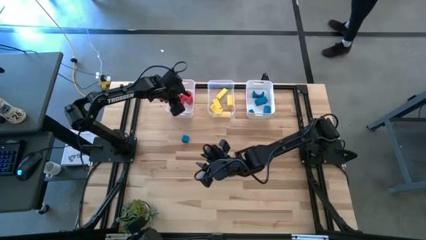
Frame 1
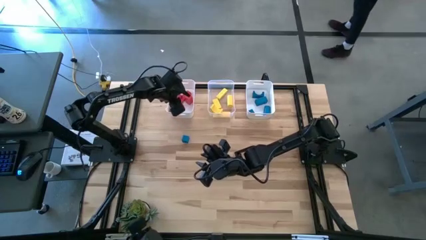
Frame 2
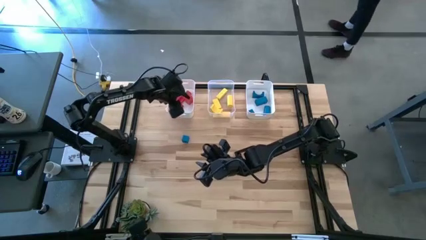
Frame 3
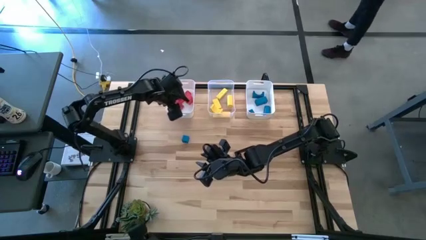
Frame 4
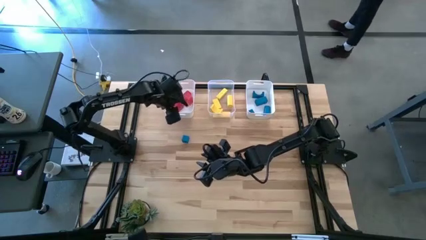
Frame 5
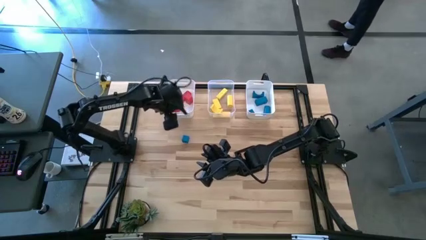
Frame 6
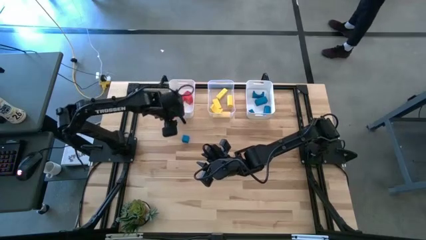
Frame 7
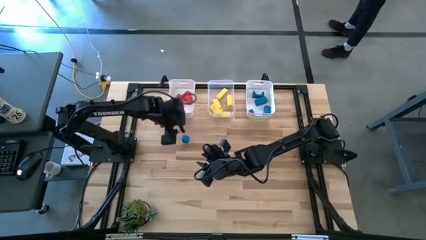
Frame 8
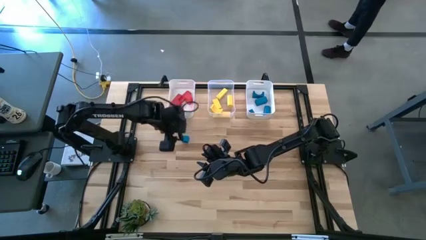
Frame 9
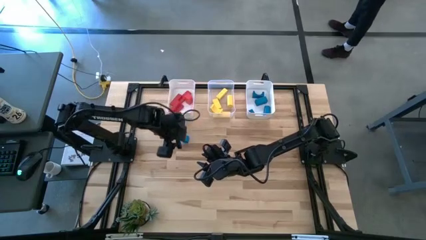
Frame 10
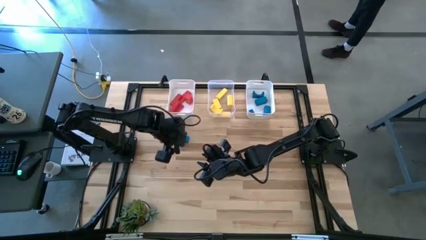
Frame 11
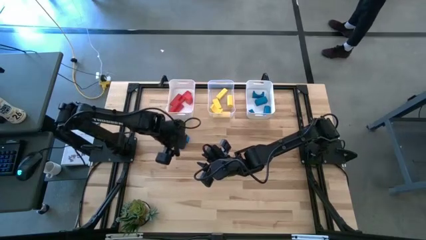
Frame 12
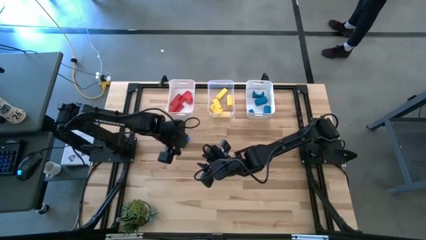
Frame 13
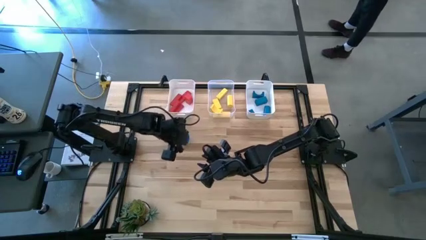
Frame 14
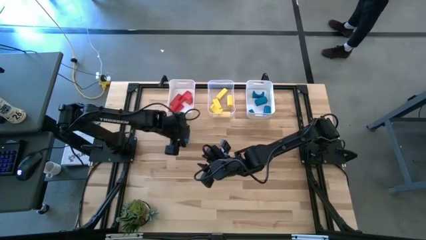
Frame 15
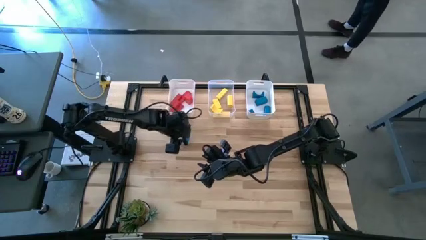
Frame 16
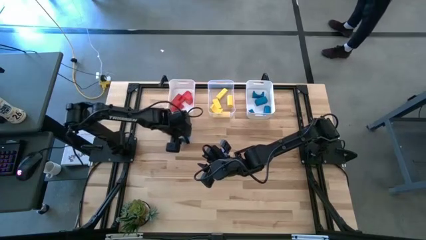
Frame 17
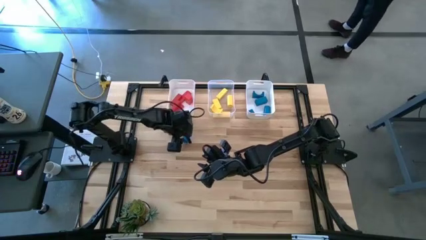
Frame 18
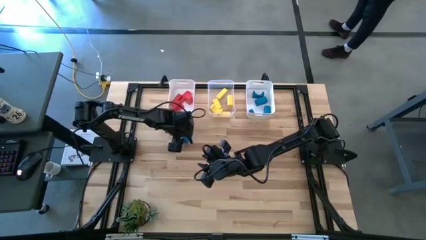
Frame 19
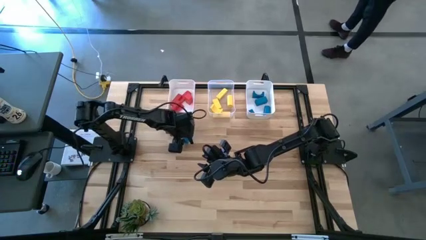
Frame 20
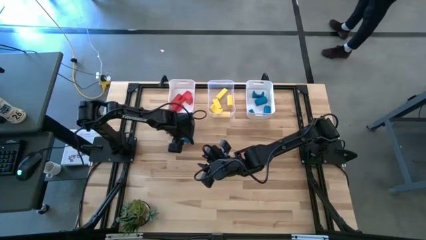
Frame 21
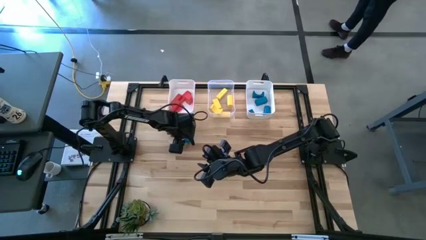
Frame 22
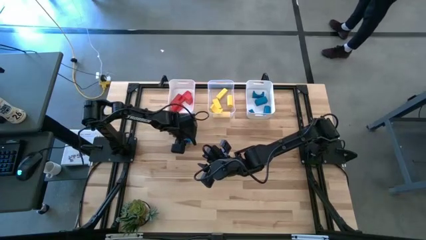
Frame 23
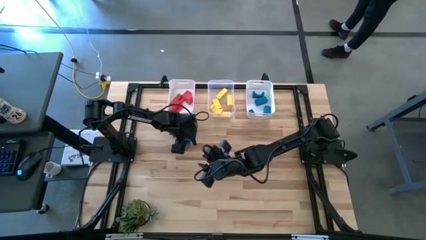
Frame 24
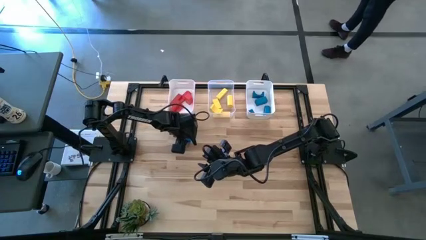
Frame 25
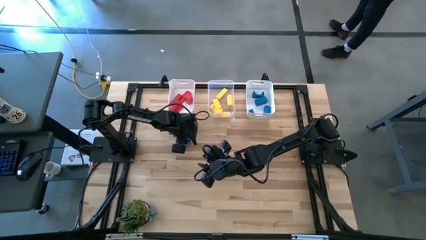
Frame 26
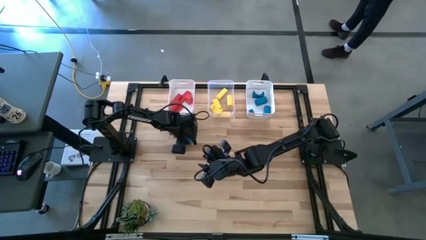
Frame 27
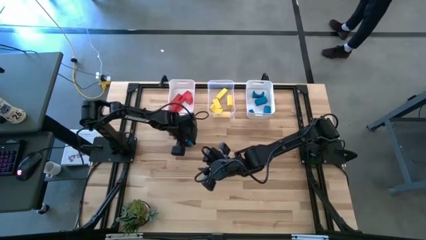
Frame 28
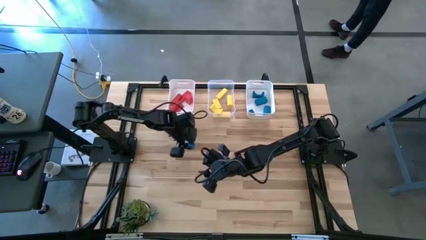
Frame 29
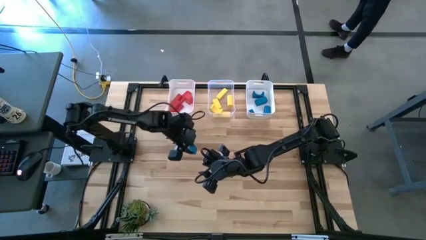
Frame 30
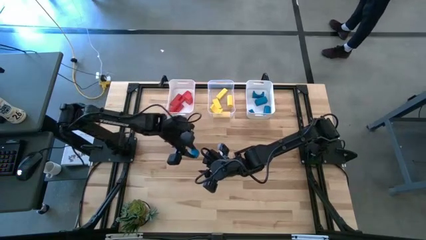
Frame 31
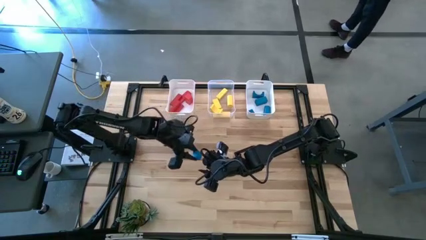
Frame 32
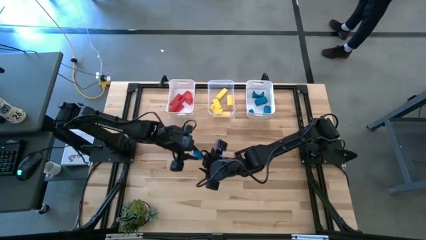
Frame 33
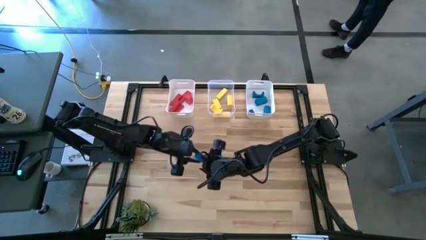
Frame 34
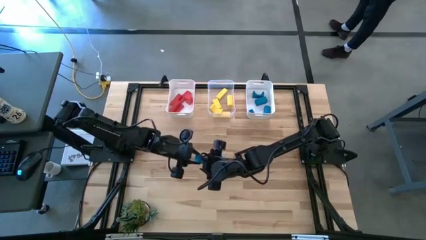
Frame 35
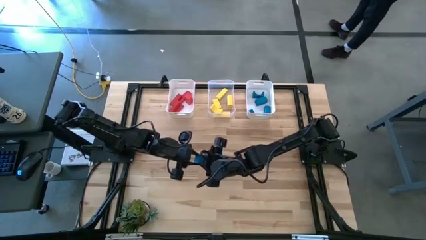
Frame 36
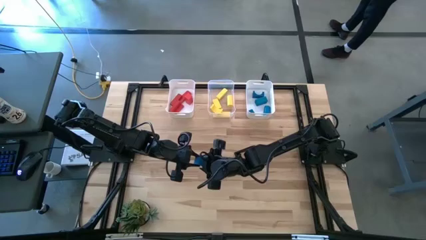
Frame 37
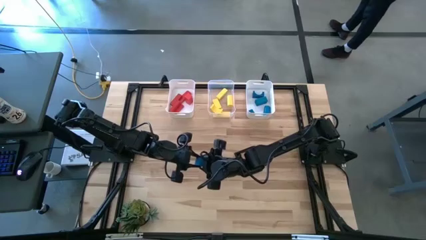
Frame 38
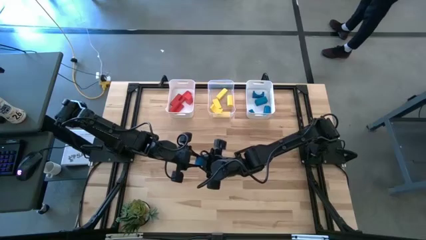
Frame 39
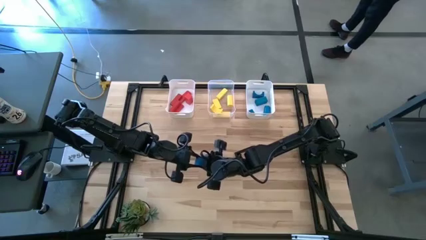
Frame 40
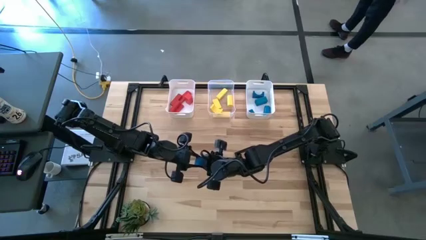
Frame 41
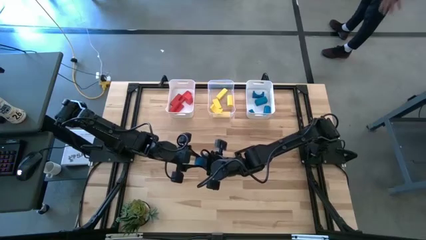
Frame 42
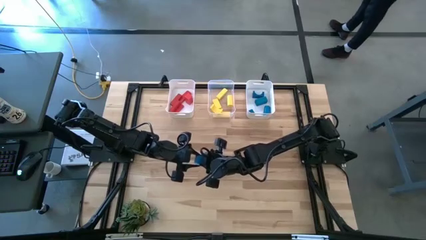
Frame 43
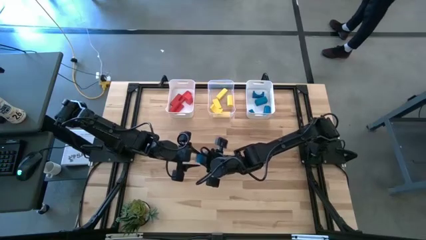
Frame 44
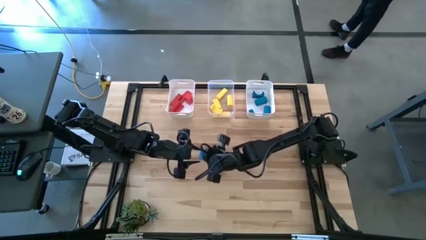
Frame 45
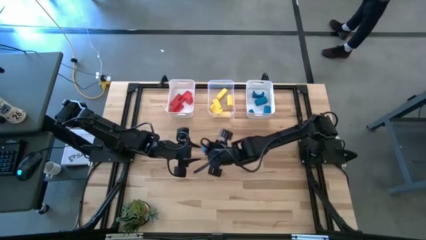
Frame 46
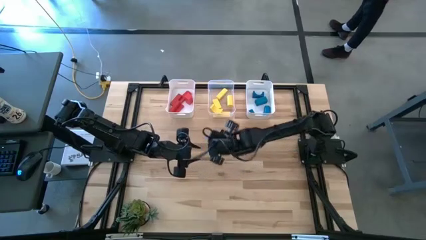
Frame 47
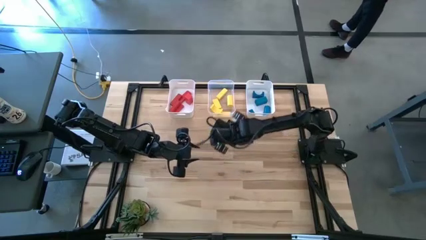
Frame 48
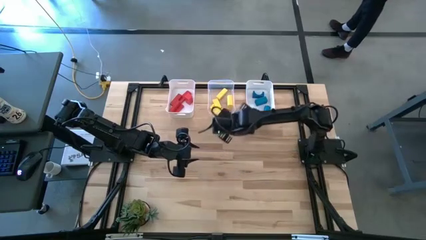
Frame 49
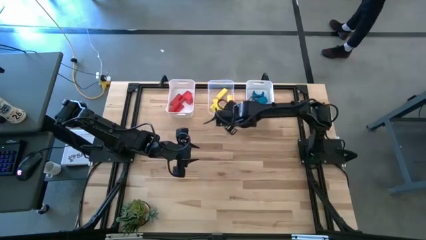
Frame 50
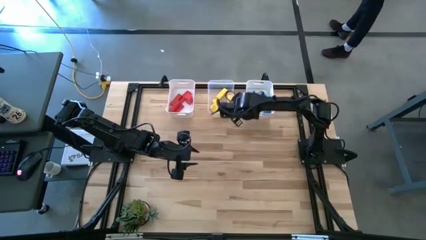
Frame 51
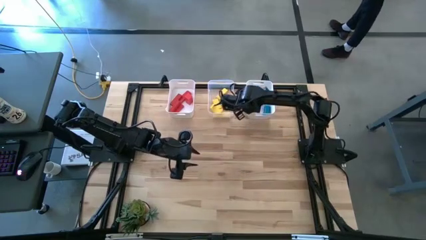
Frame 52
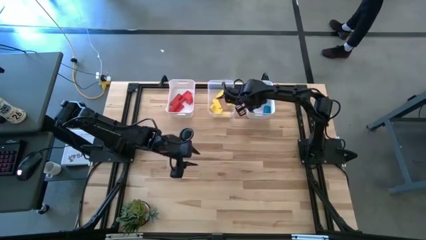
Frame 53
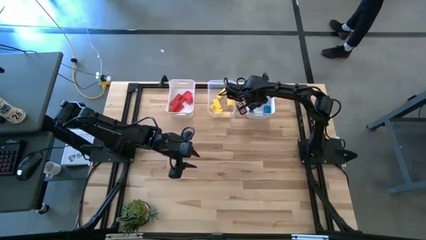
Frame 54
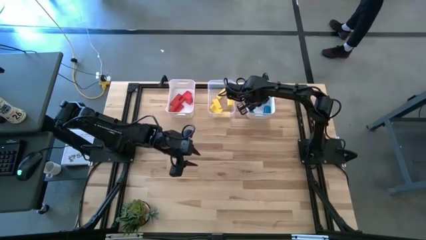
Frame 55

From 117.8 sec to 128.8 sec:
Task: Sort & place blocks by color
Put the blue block into the right white bin

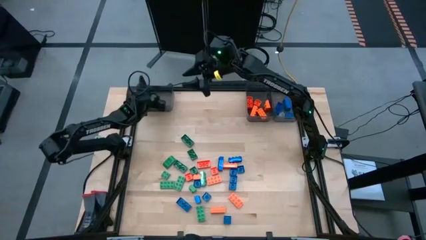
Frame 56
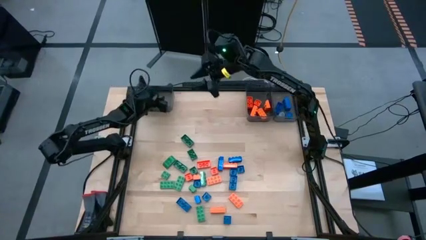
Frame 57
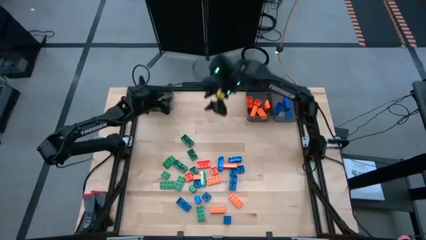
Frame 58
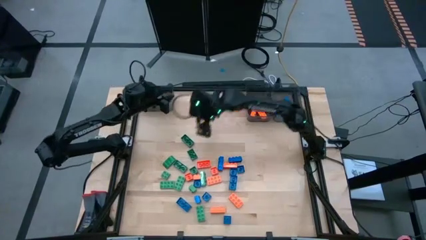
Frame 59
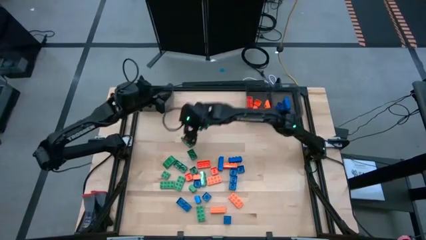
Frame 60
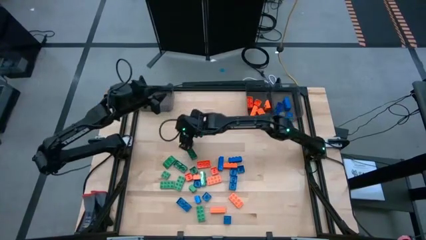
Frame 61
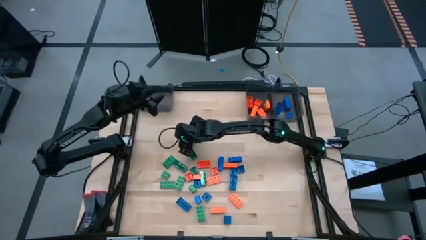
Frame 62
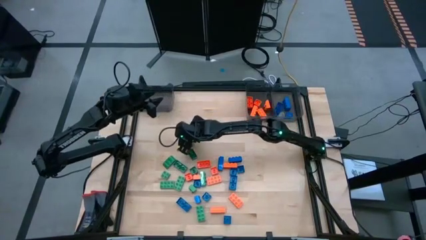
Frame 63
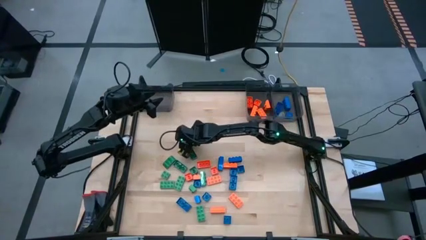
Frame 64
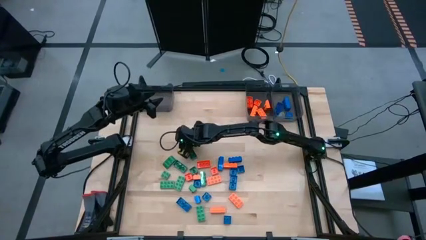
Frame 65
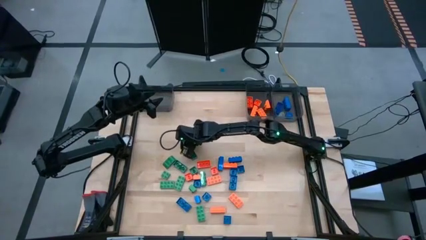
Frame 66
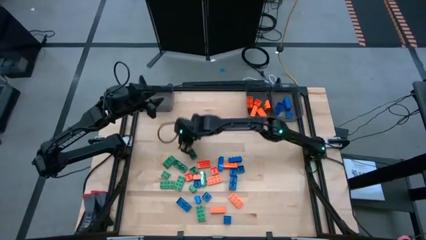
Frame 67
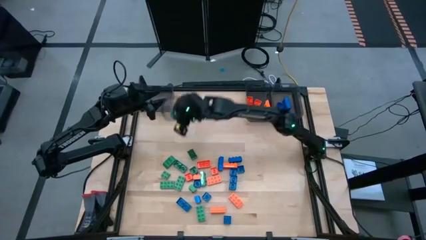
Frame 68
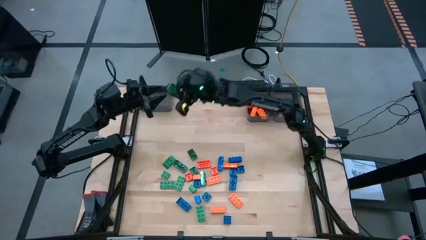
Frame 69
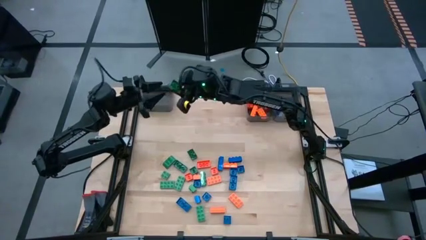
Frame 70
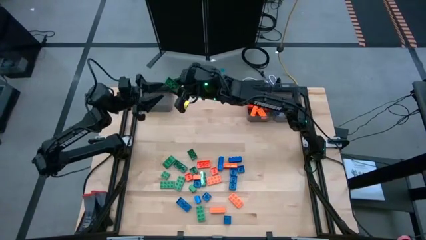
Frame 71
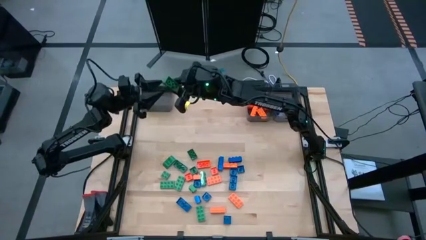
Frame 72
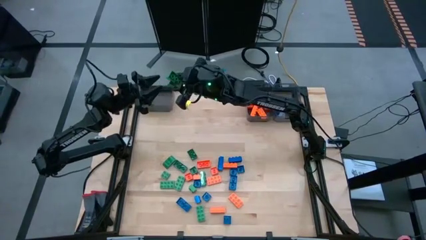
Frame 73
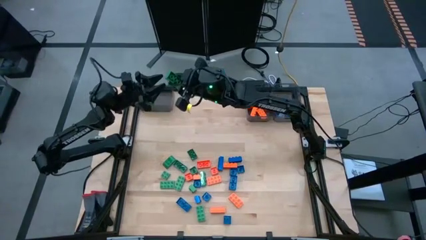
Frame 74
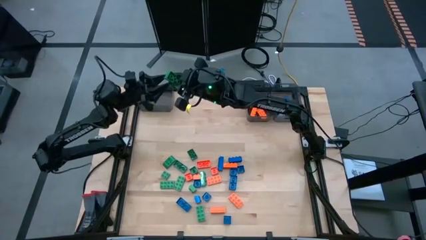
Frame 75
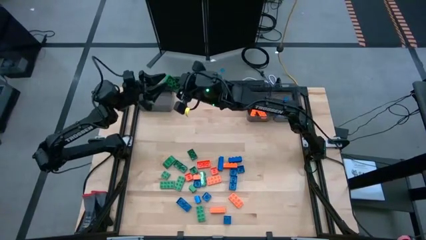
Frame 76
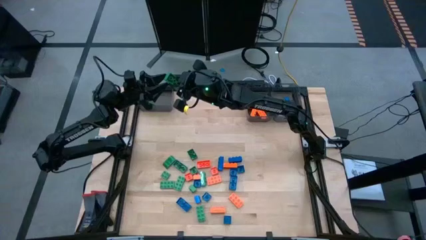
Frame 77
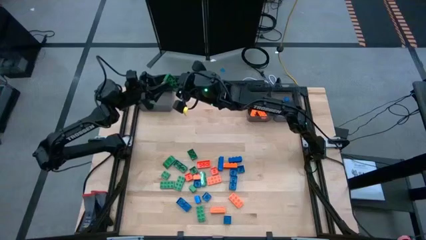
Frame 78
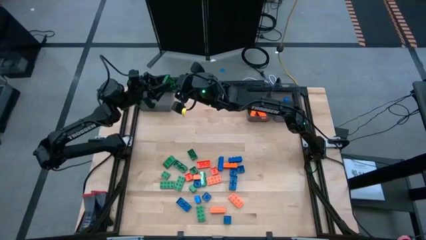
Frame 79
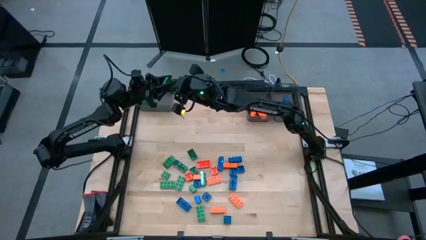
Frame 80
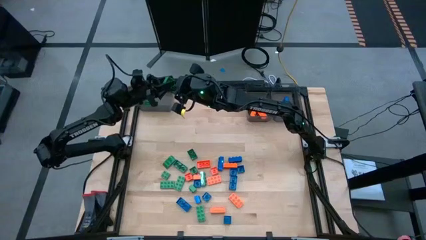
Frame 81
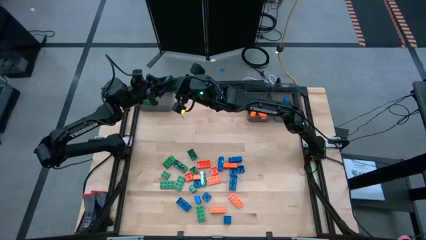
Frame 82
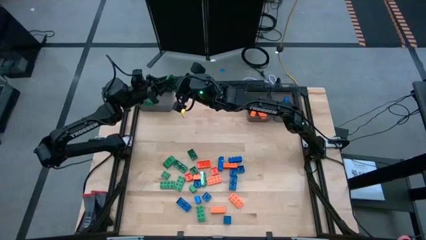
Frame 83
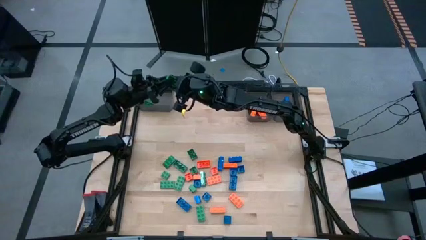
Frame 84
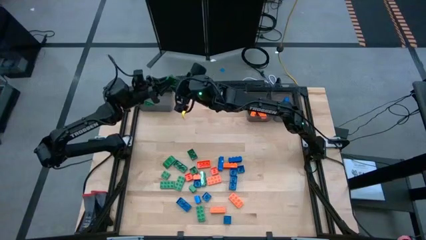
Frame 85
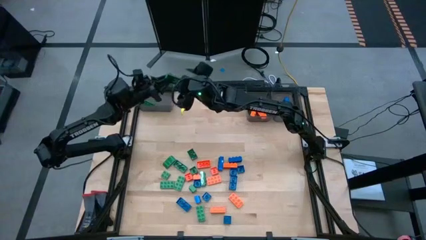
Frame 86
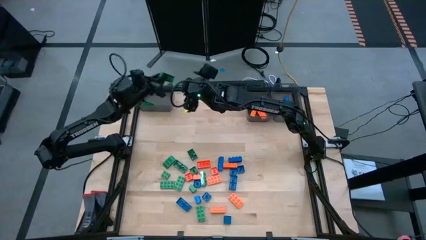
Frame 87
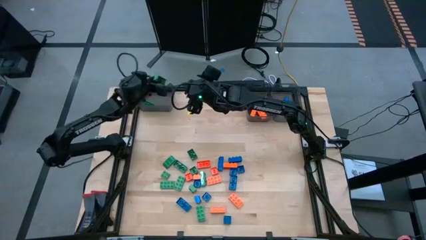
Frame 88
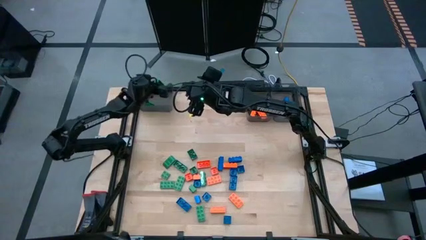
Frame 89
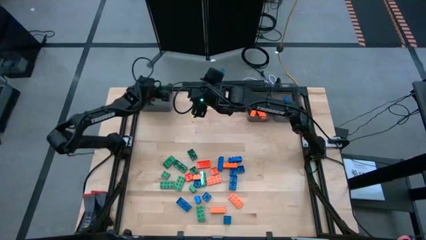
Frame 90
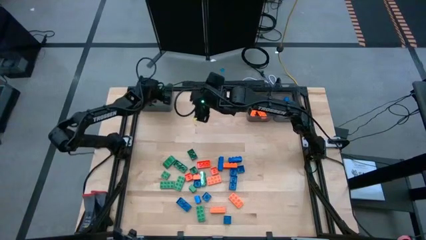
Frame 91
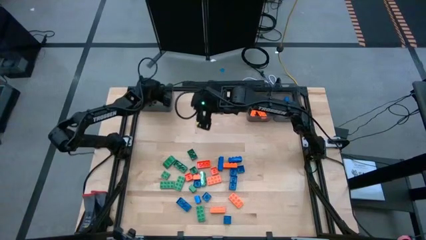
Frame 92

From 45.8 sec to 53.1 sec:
Task: Sort blocks
Put the green game piece into the left black bin
